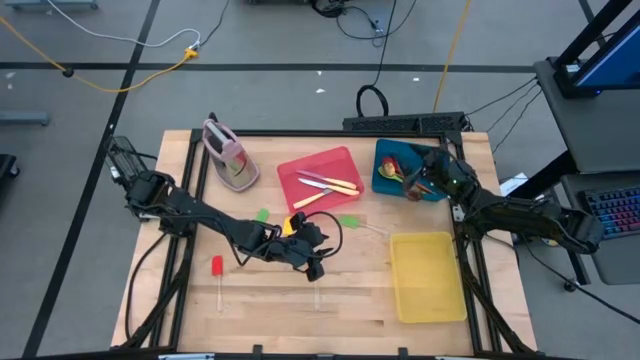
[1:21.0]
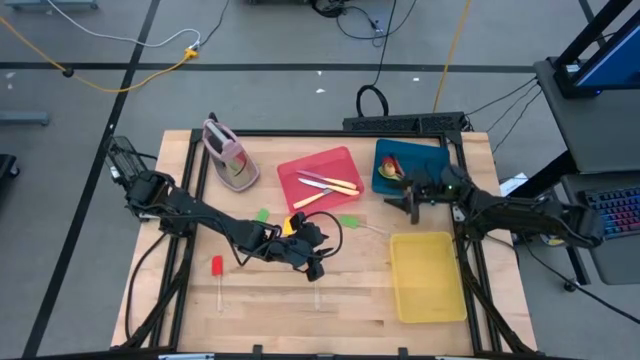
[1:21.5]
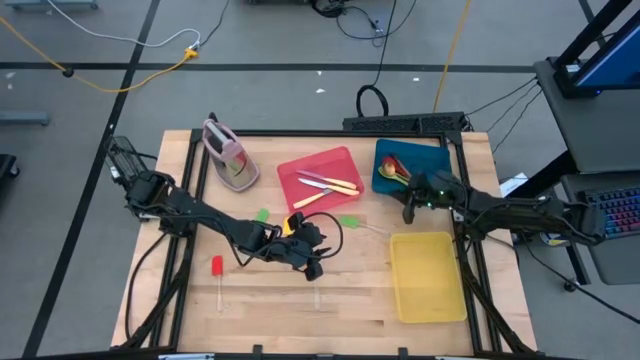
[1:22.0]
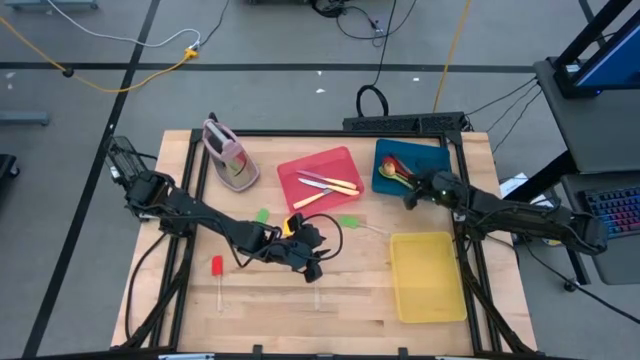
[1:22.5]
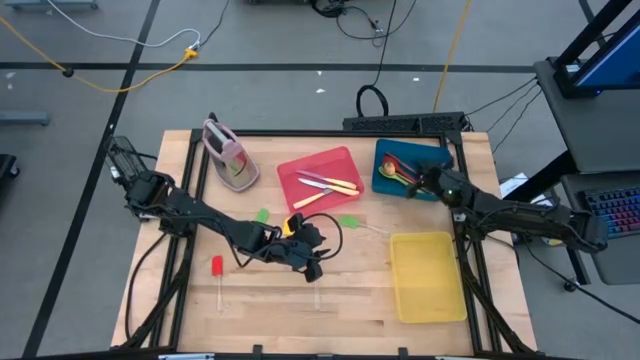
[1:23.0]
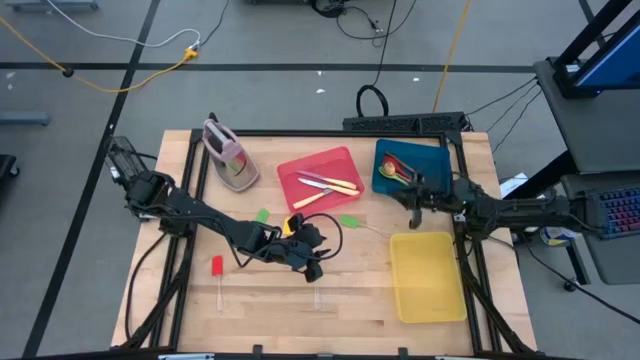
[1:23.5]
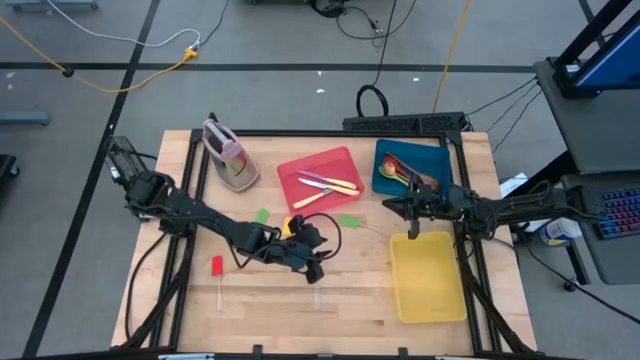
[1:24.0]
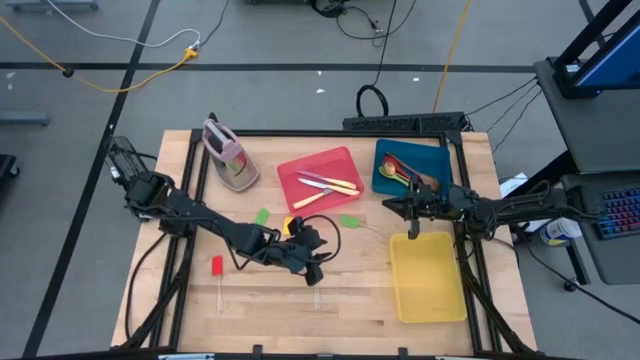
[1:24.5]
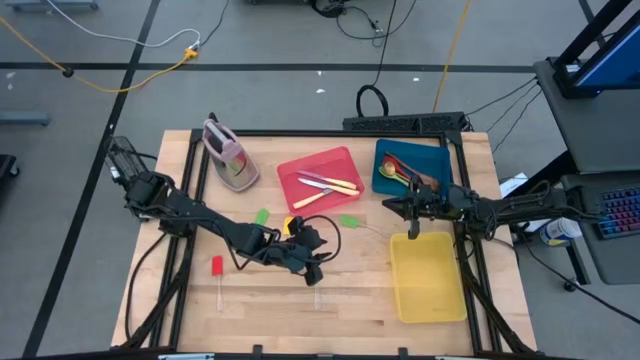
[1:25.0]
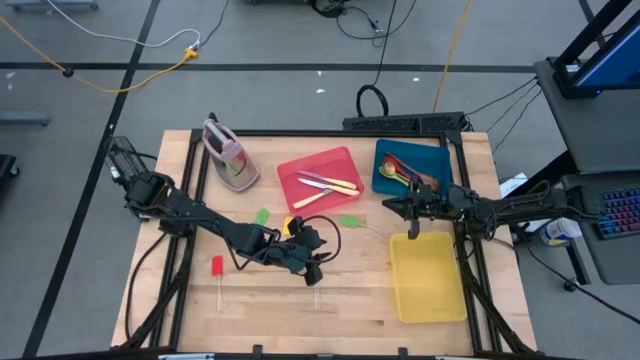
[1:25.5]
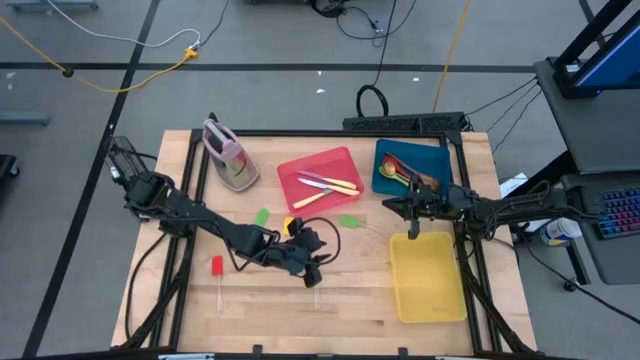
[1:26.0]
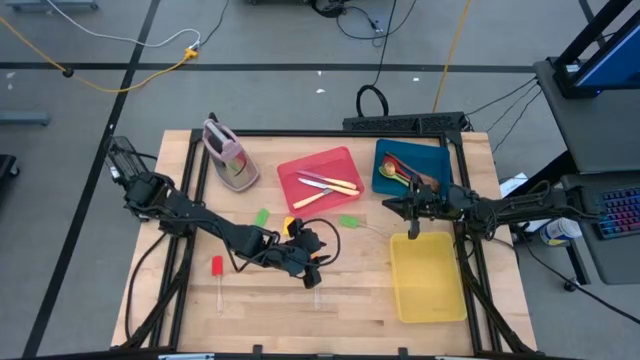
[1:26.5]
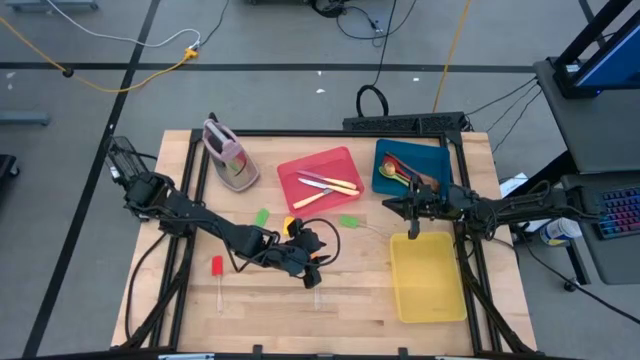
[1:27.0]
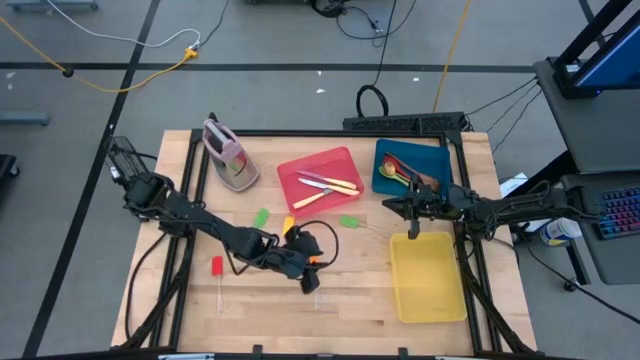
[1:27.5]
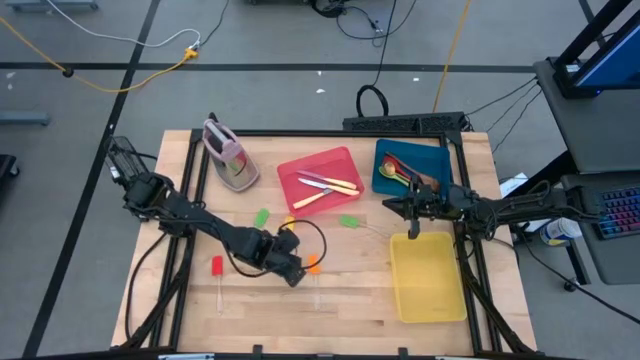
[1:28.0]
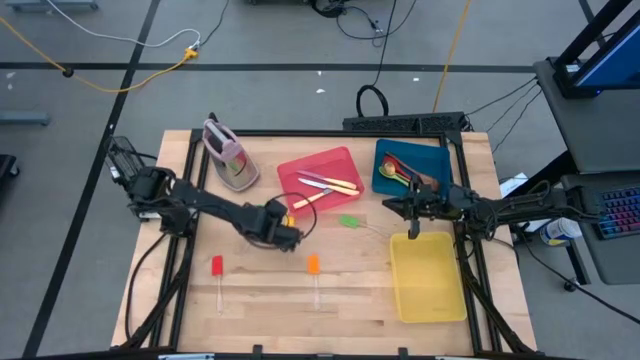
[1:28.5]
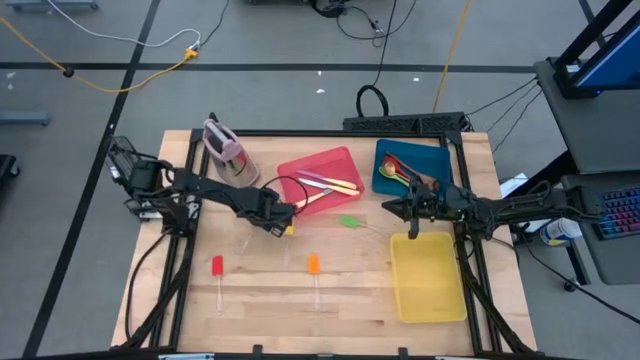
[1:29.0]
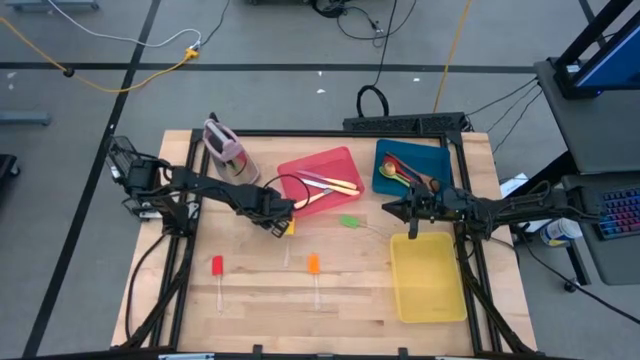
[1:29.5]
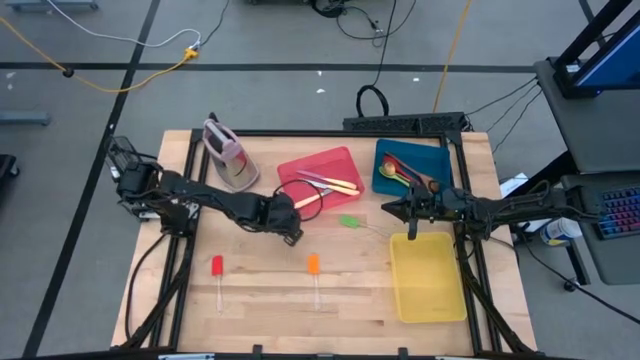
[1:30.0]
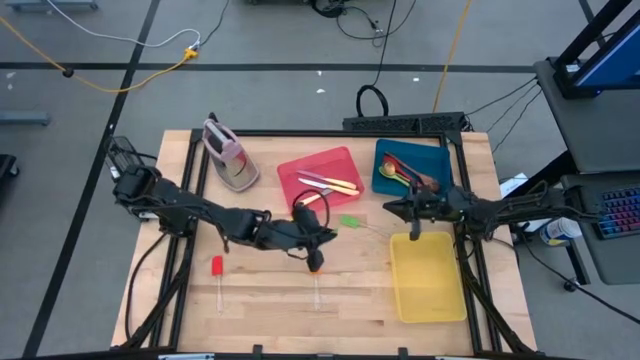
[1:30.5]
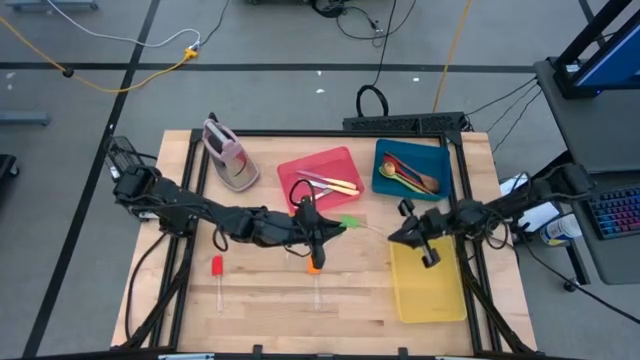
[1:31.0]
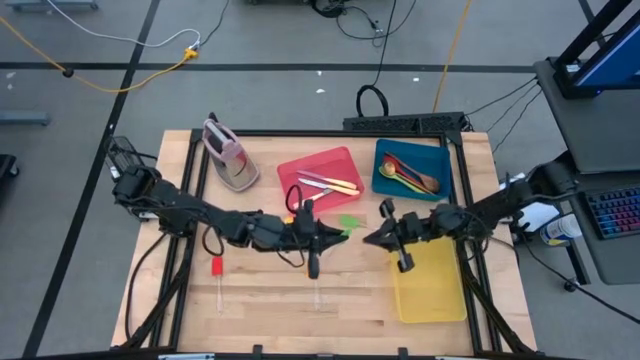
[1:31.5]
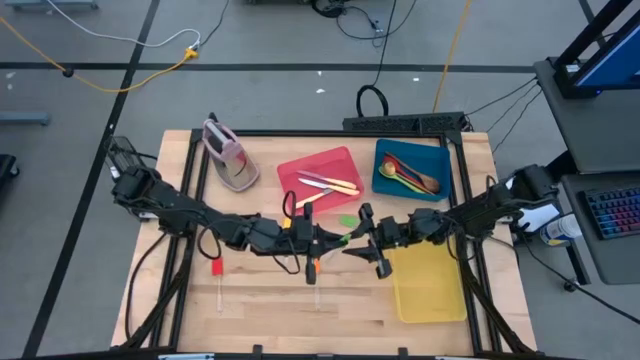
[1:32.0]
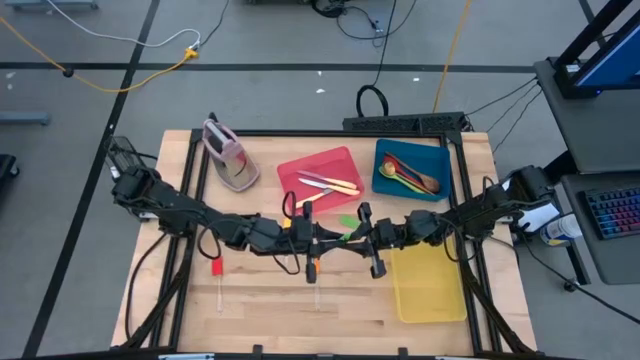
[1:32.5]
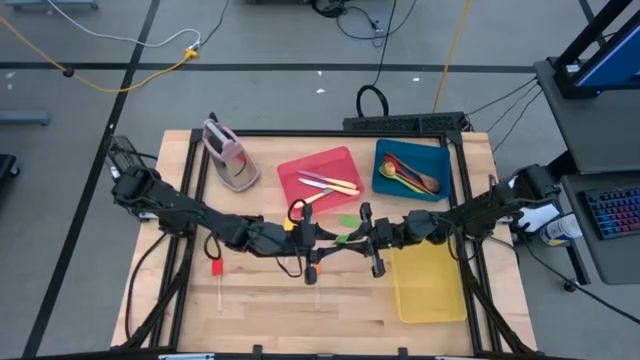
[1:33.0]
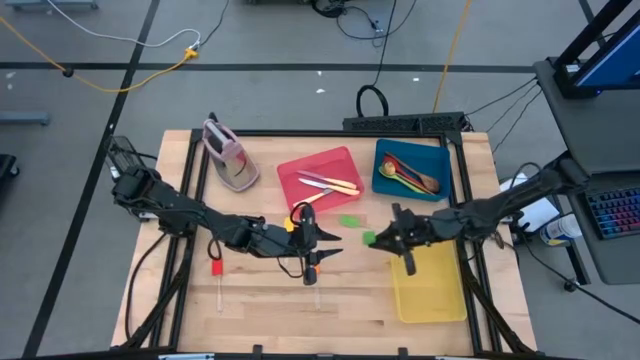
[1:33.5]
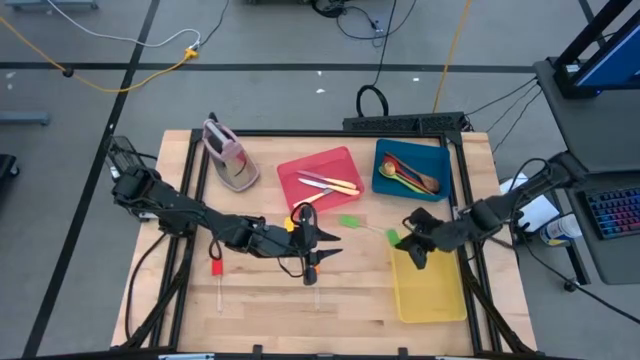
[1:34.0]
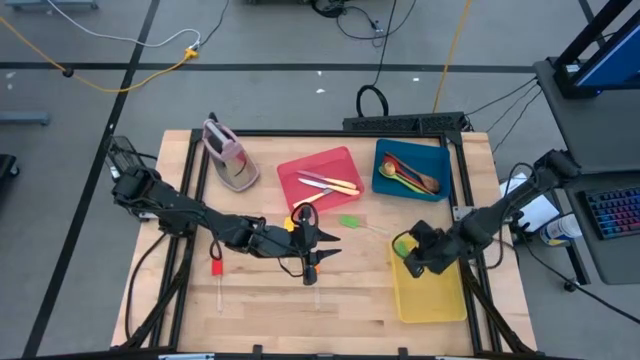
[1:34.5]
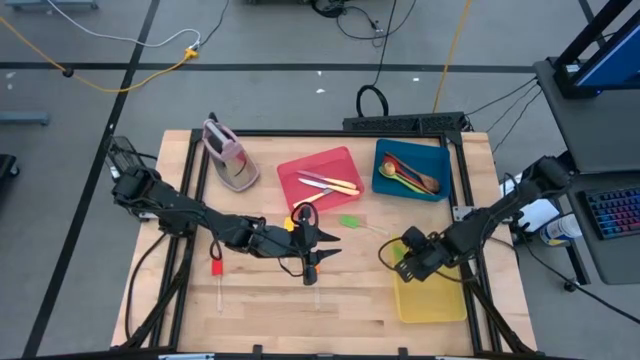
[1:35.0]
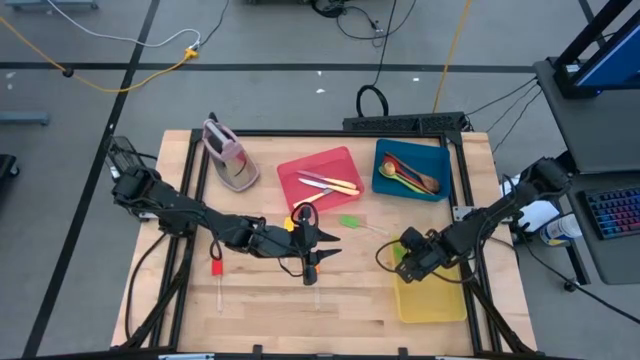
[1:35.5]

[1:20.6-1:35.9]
Task: Pick & Place Kitchen Items
Put the green spatula into the yellow bin

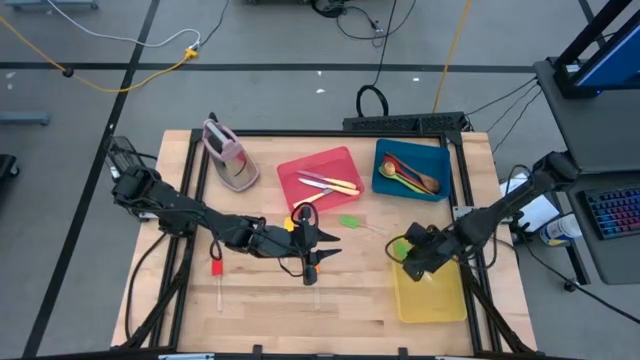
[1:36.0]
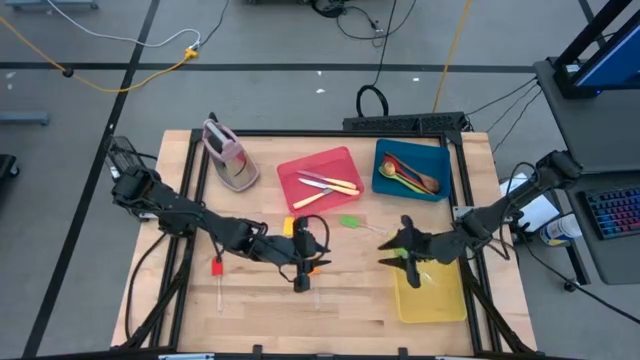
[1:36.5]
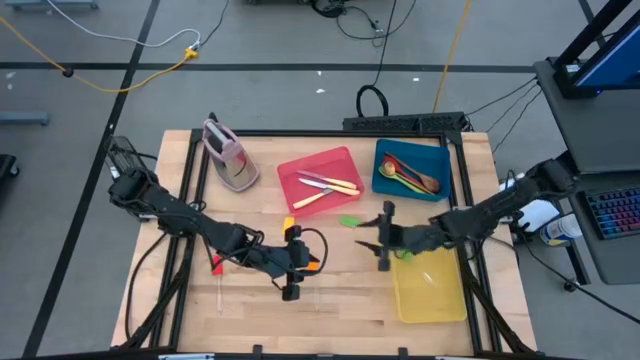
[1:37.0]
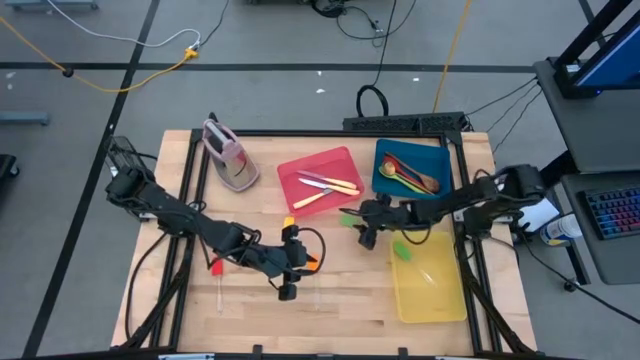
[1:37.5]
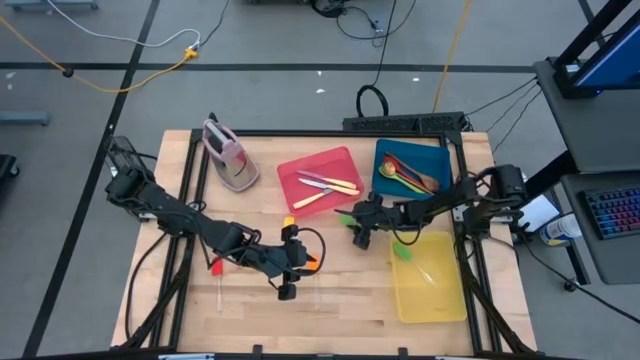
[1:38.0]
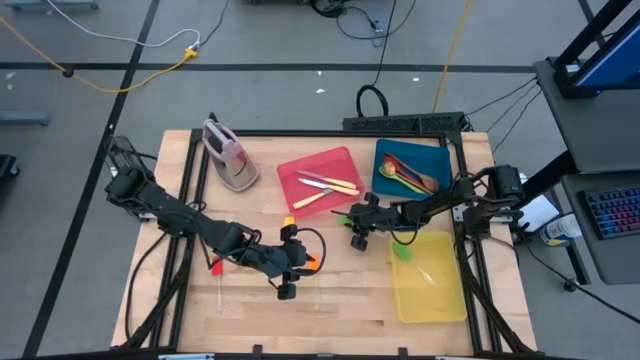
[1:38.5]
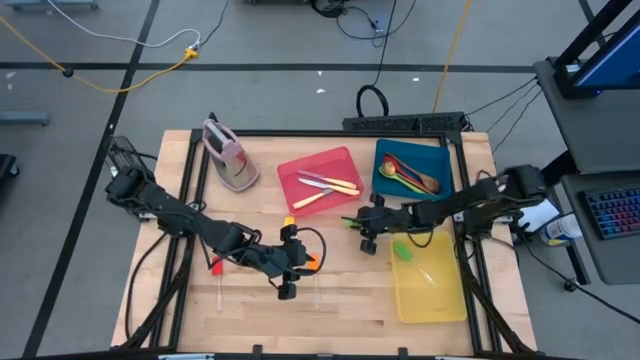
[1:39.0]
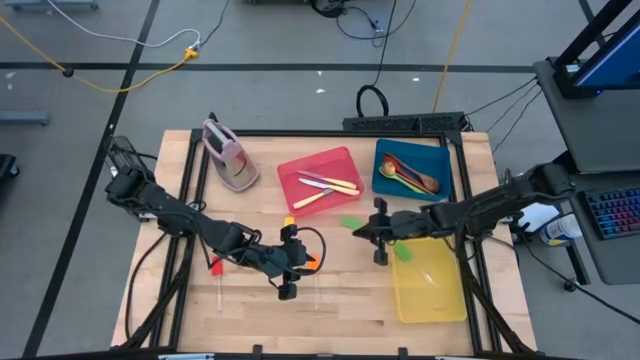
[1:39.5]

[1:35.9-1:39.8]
Put the green spatula into the yellow bin

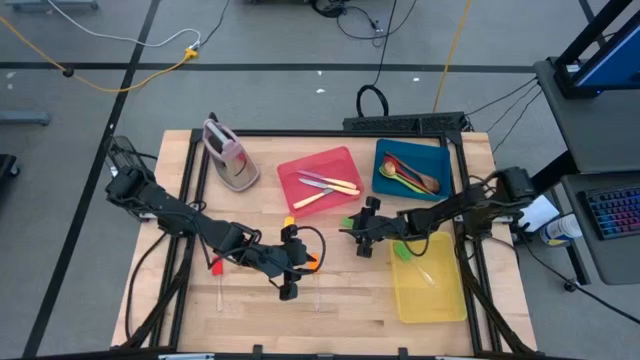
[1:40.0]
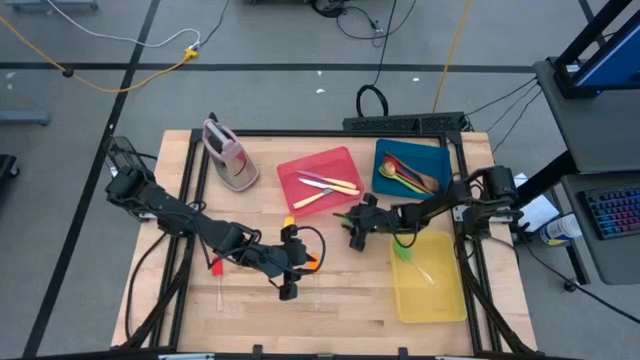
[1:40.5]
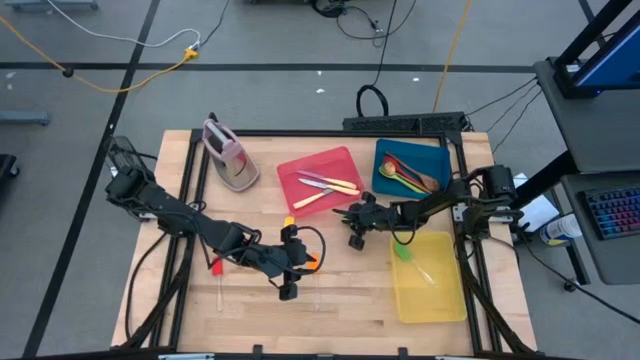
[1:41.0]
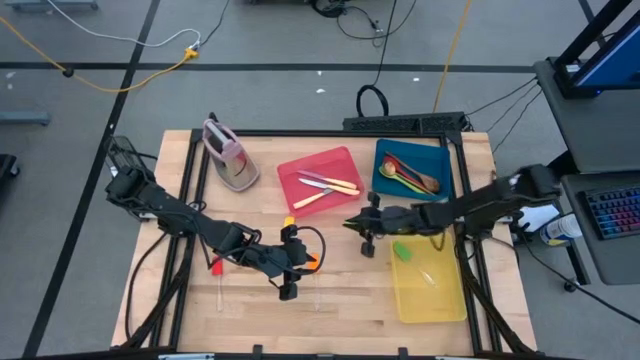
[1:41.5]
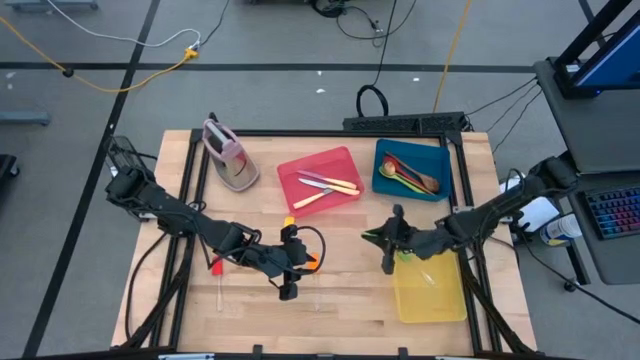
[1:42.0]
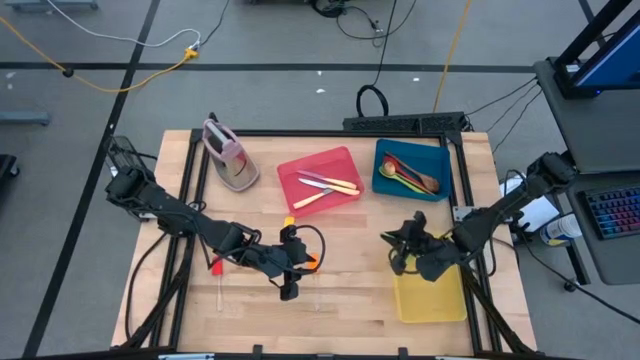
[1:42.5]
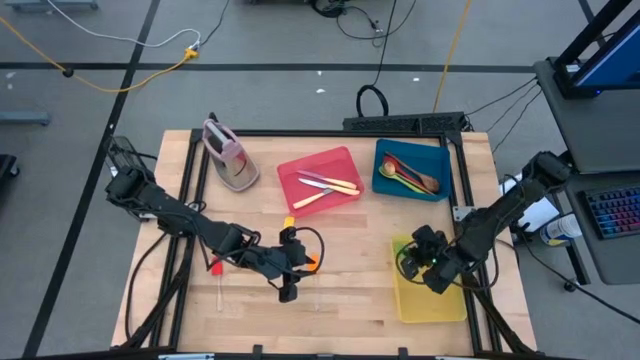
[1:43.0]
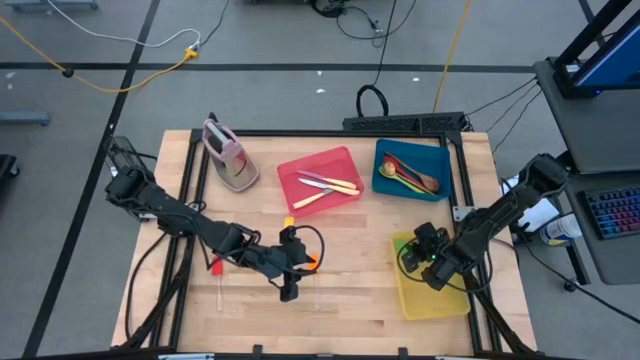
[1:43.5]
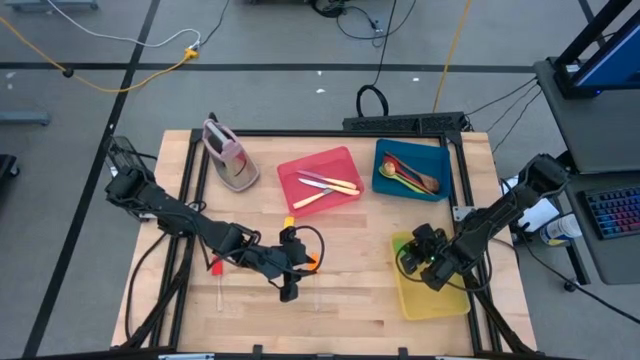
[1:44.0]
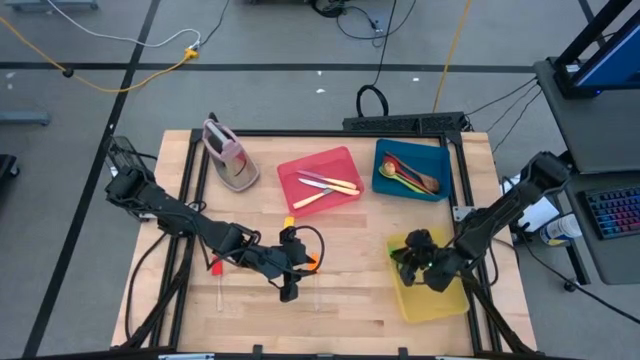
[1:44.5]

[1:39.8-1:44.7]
Put the green spatula into the yellow bin
